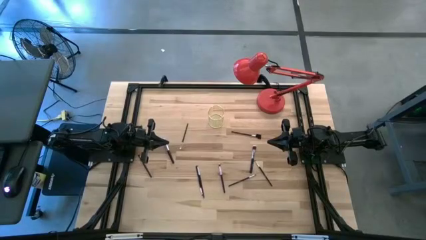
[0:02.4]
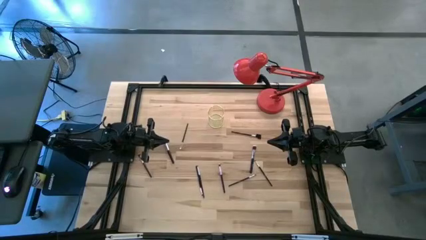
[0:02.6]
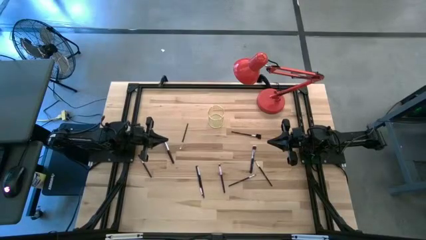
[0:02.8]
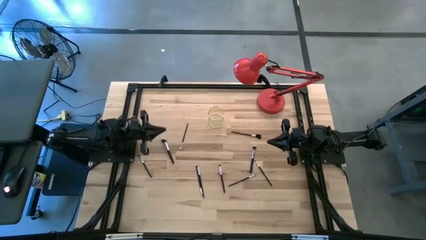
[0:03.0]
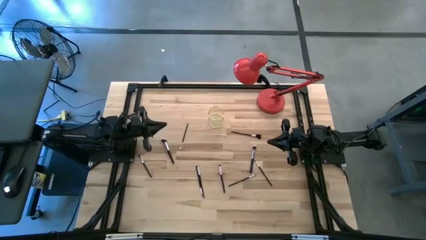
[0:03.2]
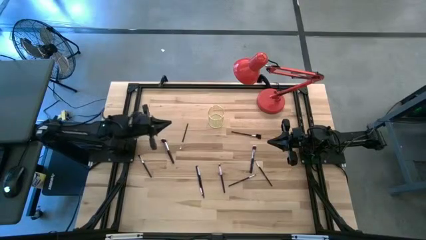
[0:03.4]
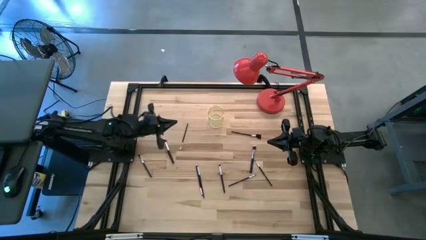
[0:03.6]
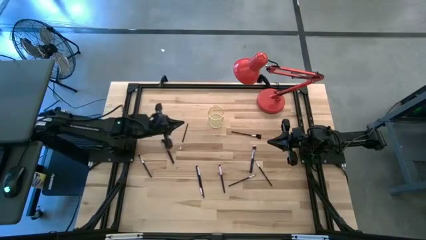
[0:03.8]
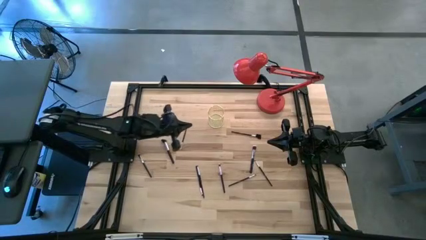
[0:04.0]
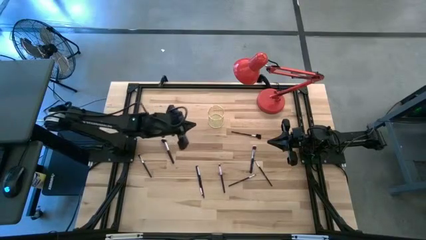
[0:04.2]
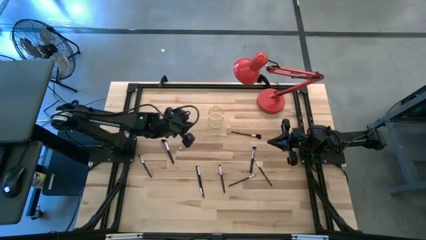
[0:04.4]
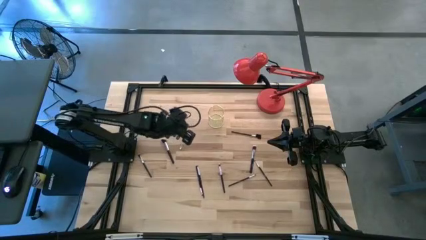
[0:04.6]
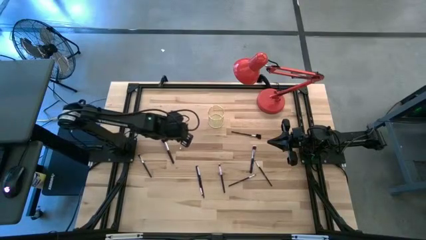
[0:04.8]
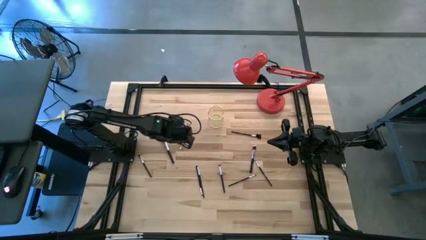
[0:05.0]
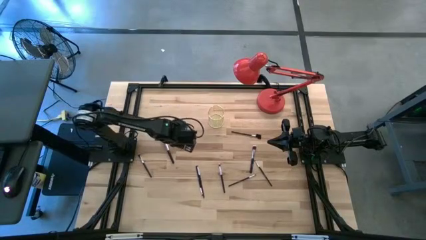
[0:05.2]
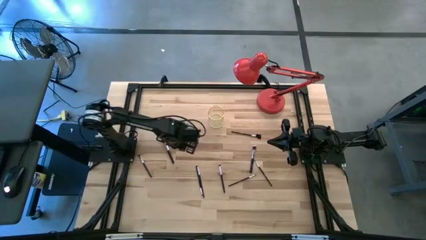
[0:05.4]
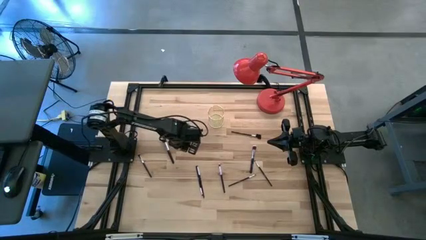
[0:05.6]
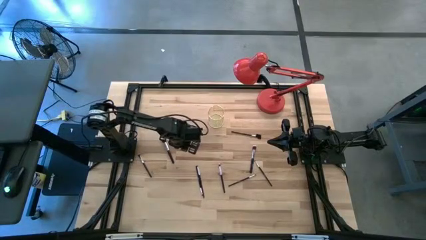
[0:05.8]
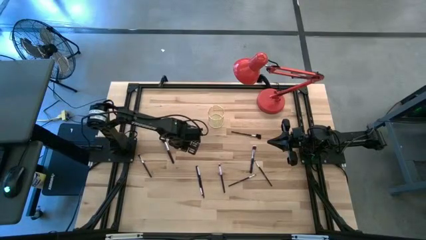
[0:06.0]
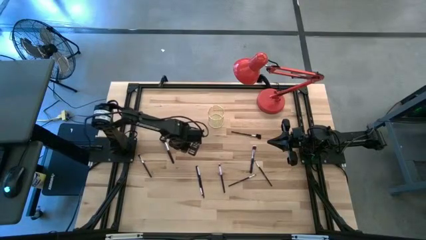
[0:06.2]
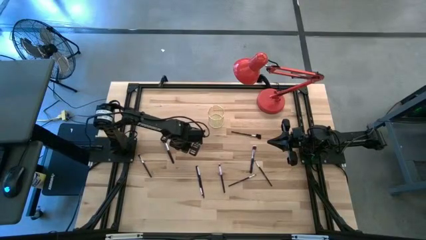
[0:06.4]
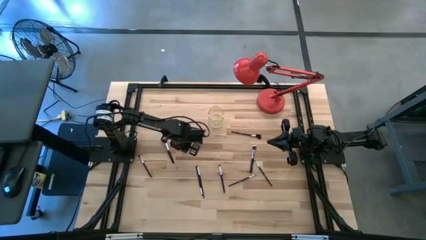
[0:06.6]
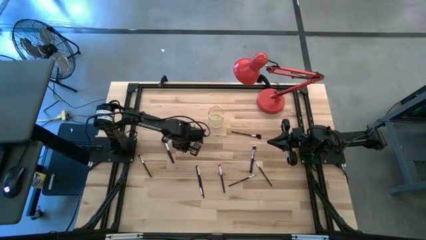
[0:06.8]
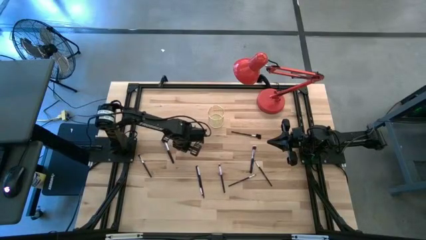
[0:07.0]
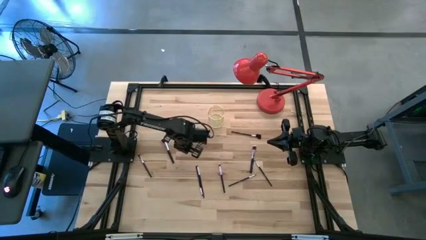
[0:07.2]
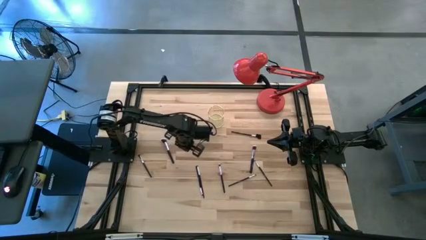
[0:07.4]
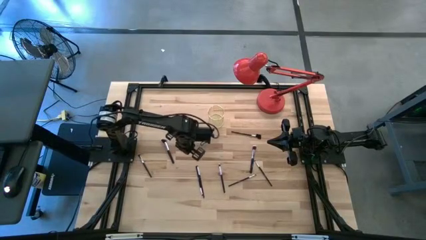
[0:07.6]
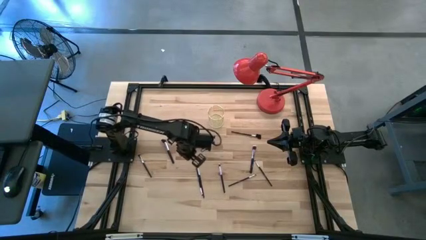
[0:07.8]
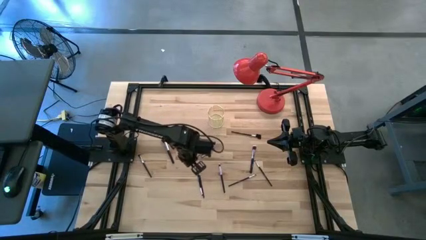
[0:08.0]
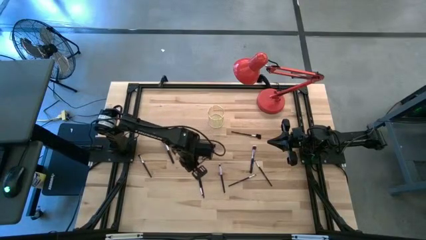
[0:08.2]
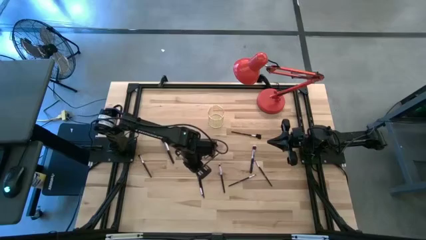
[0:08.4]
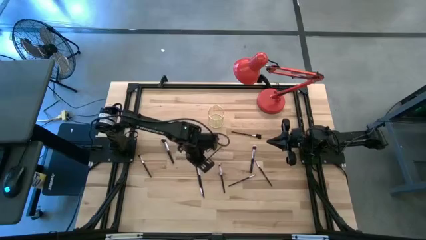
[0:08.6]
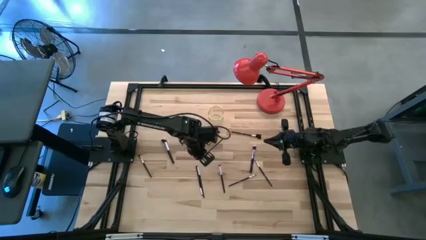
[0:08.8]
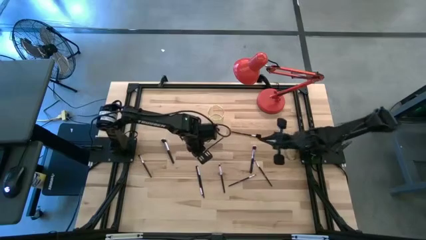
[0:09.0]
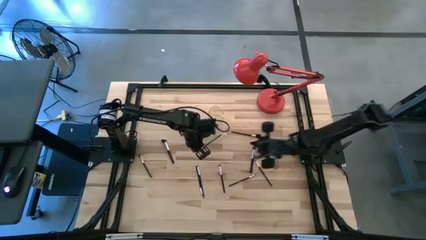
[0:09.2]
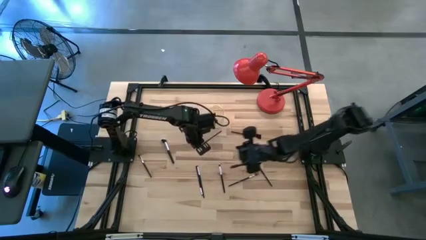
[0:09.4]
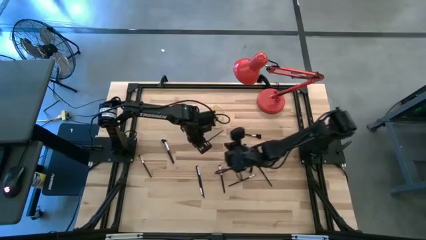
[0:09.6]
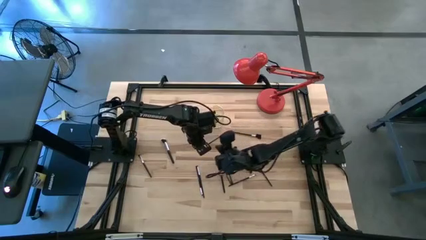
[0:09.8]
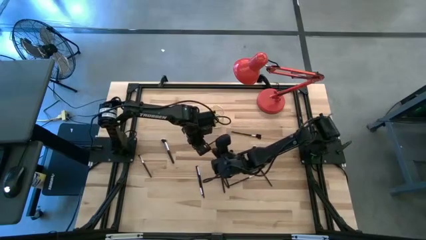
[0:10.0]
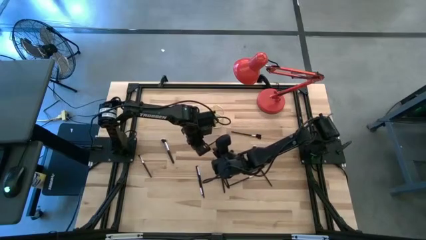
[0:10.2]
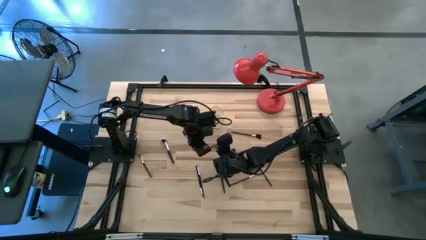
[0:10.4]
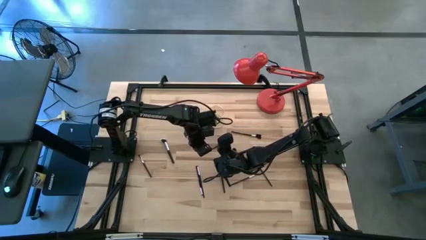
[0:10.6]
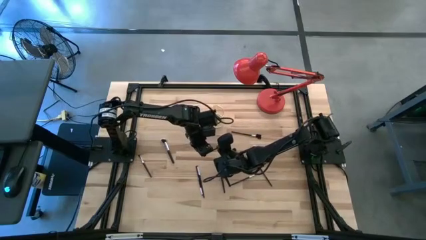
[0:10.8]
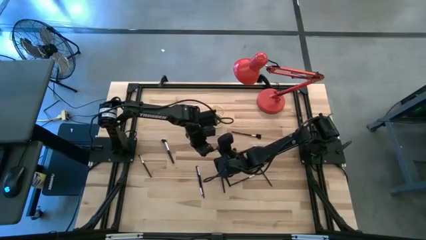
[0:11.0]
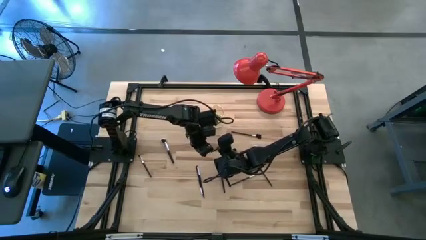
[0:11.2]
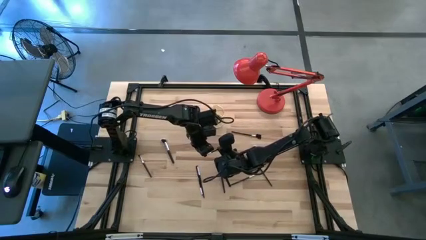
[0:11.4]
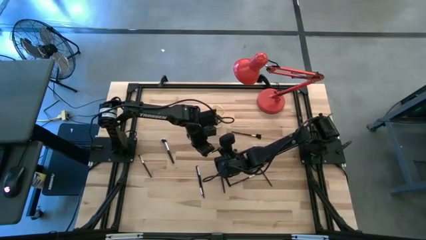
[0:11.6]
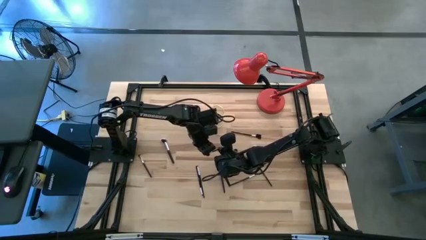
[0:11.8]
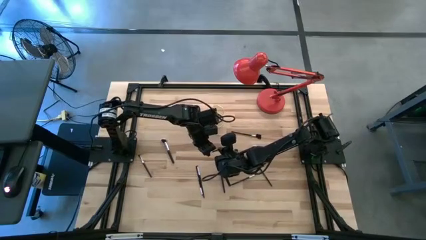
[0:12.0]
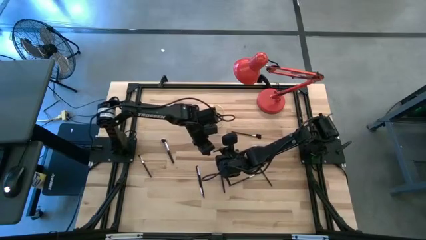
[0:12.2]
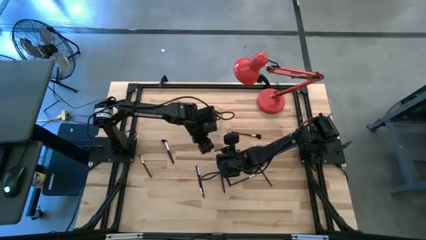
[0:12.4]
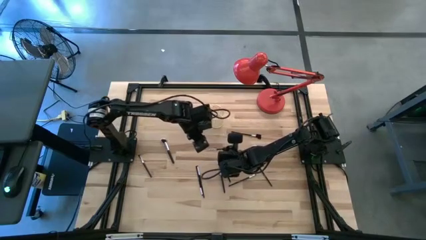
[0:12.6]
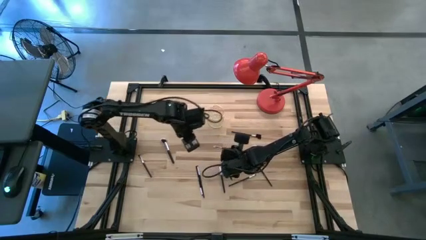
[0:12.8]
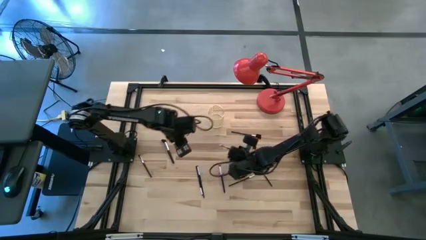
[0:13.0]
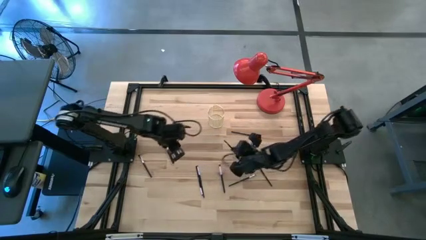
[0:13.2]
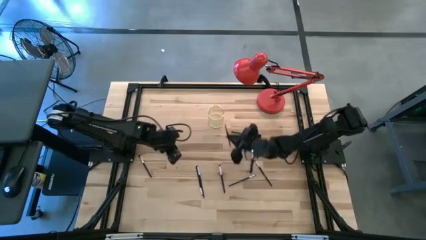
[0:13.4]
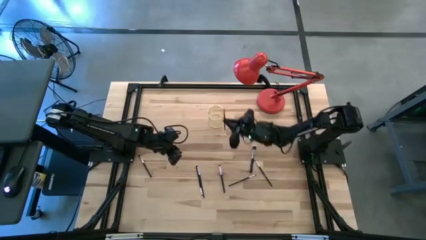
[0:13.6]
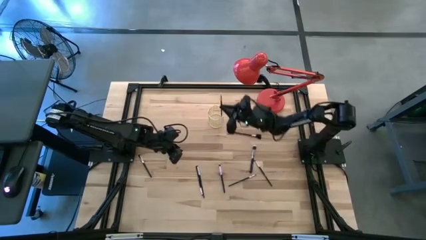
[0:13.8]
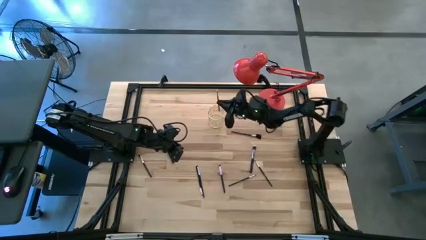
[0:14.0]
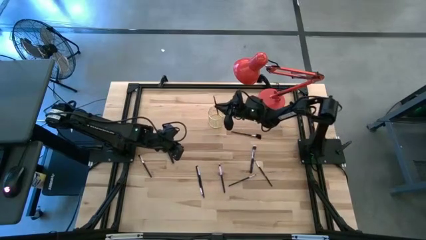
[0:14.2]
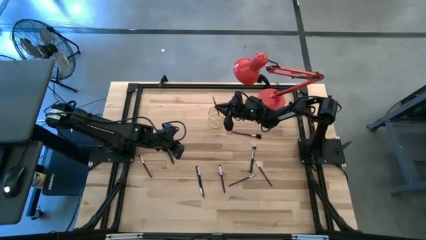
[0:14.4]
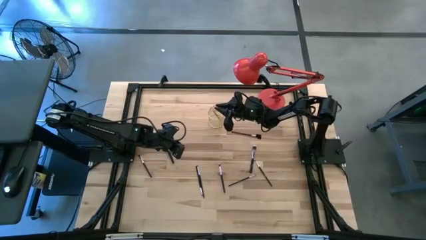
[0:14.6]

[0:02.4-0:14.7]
Task: Pick & Place Makeup Brushes
Put the eyeshadow brush into the makeup brush holder

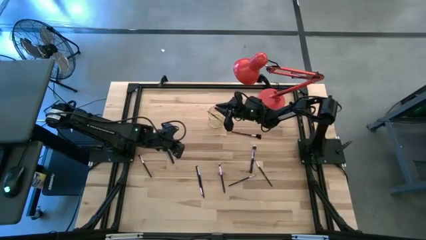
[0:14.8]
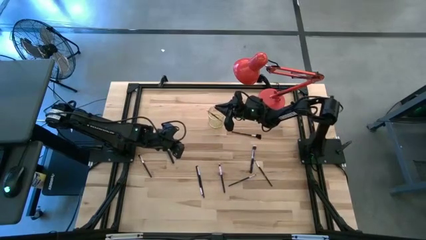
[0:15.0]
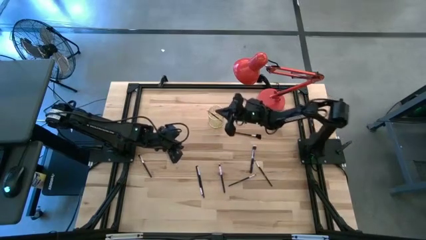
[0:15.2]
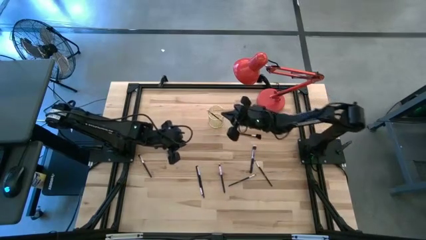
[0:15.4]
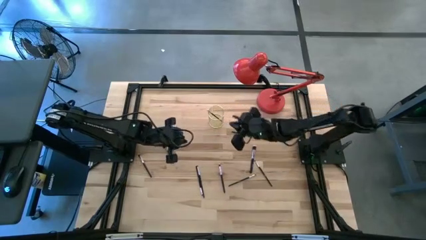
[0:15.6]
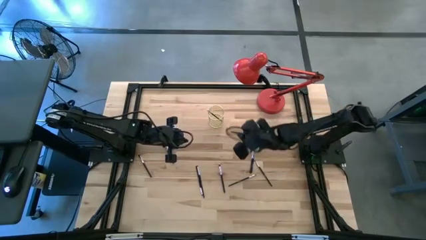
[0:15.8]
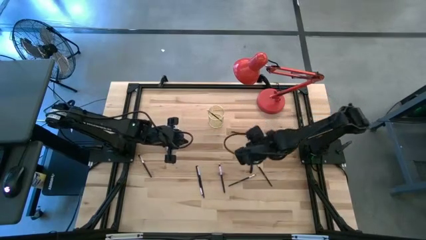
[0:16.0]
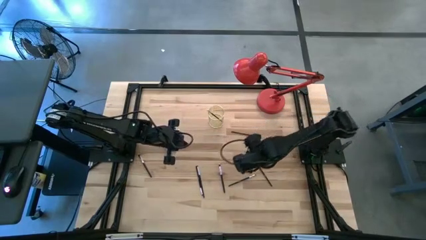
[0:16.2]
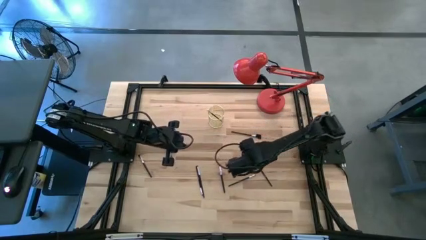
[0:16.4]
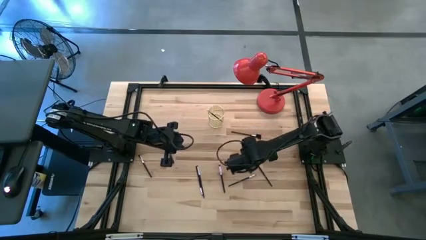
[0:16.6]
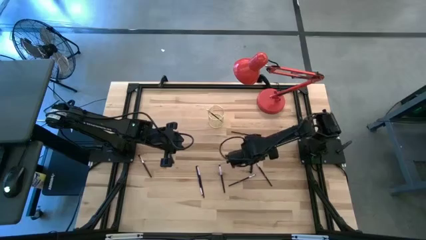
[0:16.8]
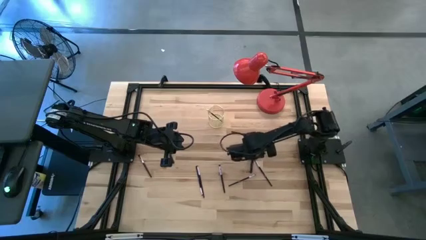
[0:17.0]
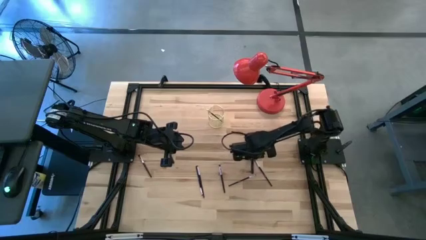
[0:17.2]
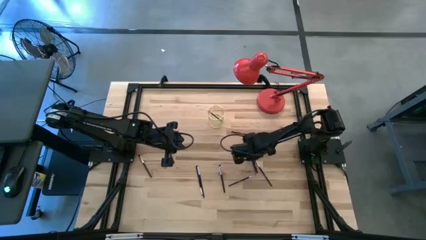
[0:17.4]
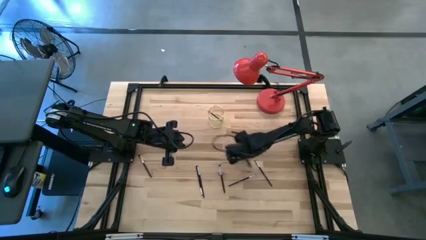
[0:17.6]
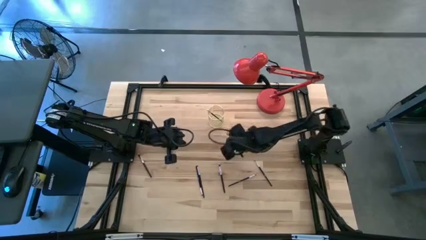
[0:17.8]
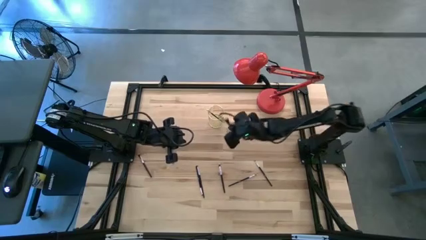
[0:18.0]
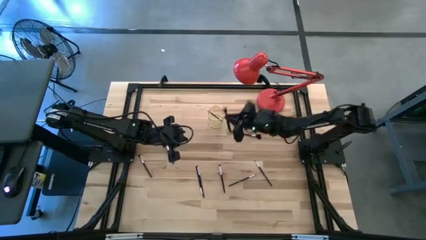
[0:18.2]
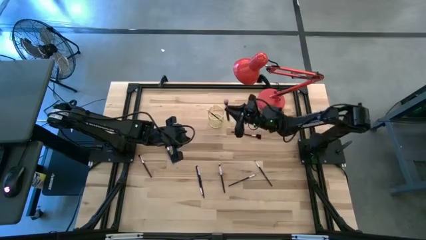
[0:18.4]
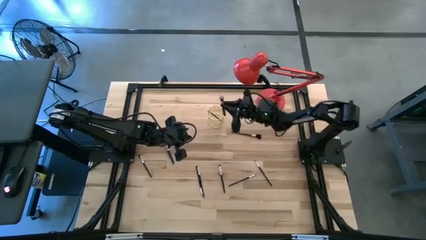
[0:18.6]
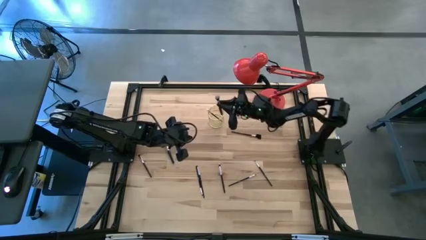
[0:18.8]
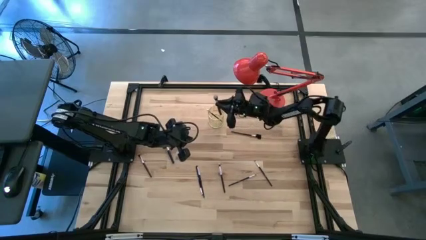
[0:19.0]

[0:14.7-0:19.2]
Put the powder brush into the makeup brush holder
